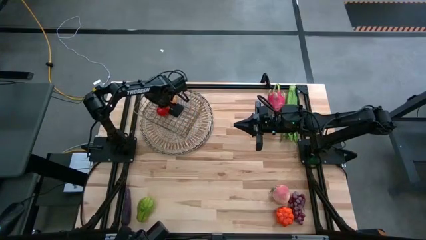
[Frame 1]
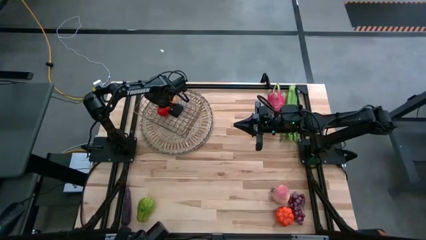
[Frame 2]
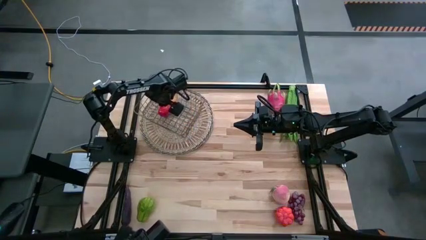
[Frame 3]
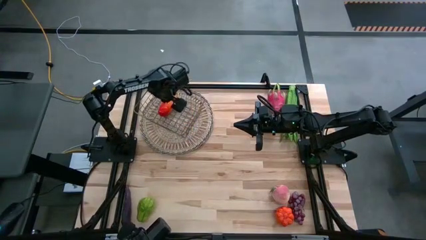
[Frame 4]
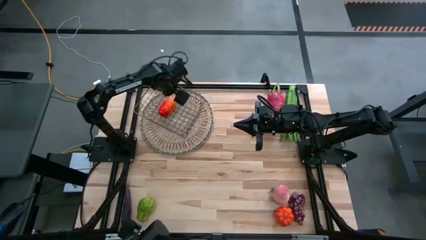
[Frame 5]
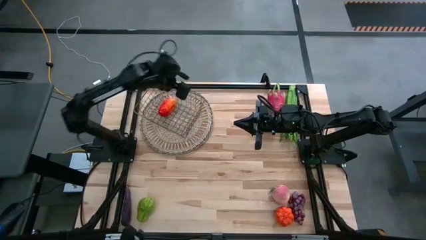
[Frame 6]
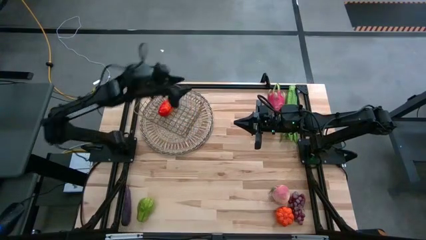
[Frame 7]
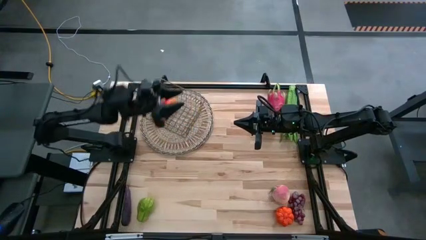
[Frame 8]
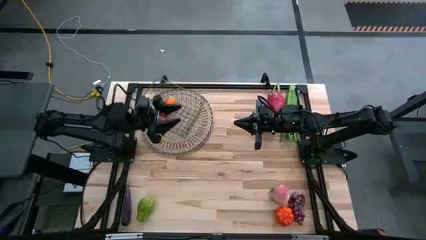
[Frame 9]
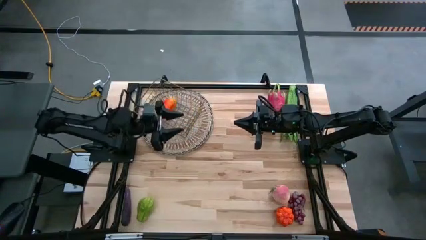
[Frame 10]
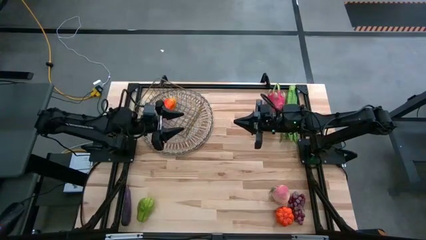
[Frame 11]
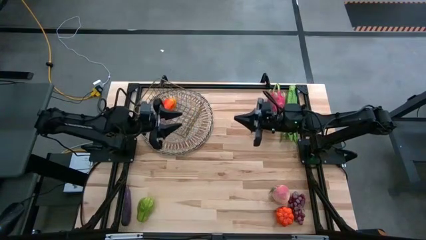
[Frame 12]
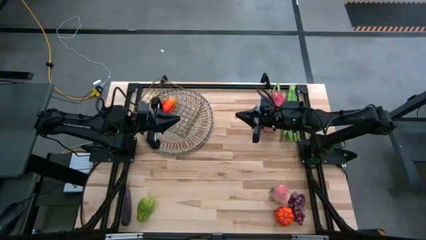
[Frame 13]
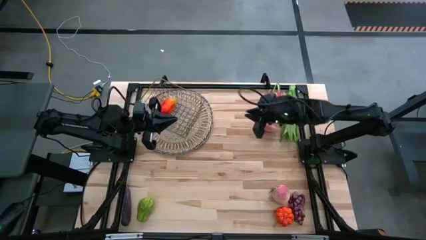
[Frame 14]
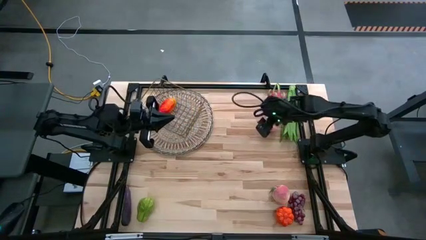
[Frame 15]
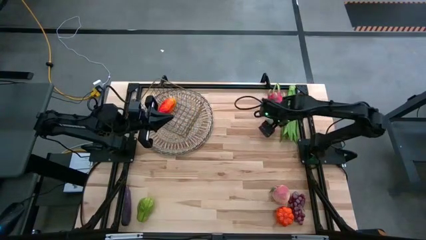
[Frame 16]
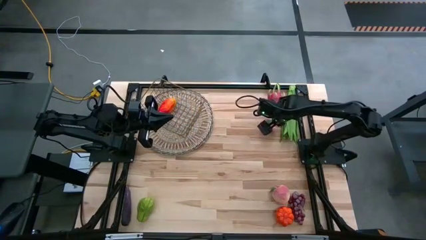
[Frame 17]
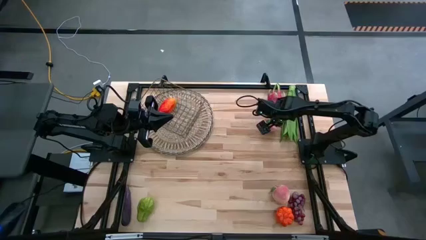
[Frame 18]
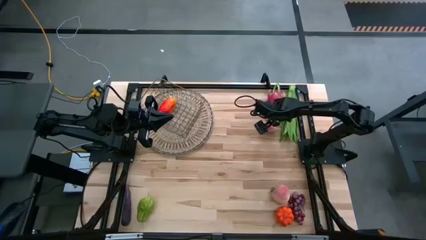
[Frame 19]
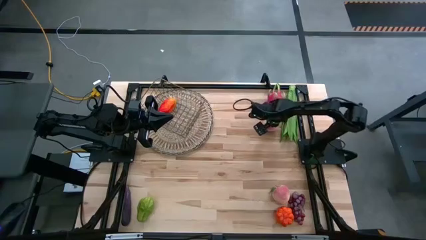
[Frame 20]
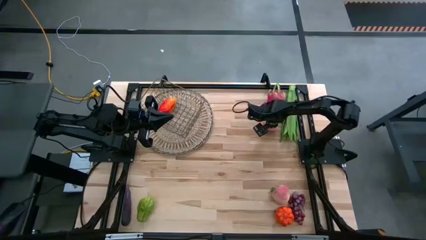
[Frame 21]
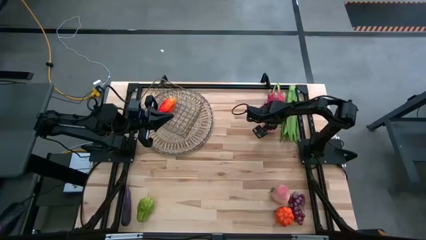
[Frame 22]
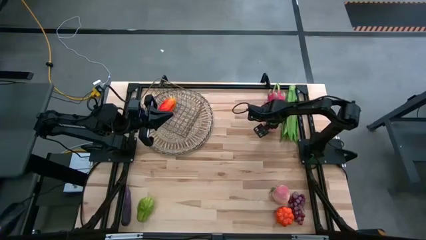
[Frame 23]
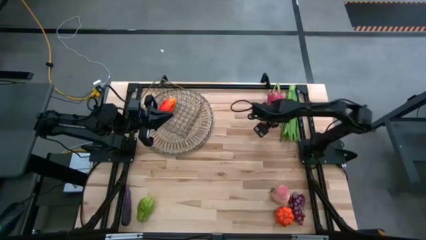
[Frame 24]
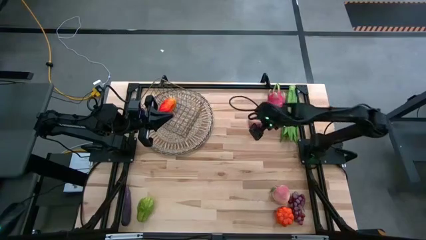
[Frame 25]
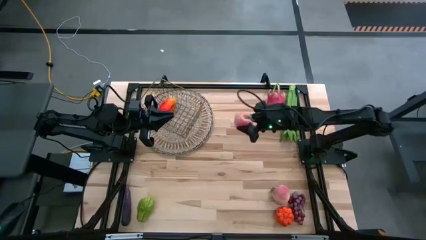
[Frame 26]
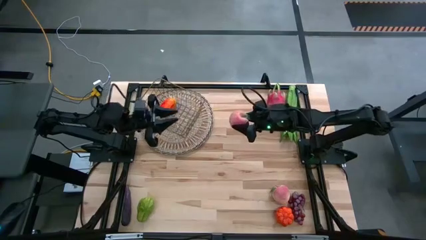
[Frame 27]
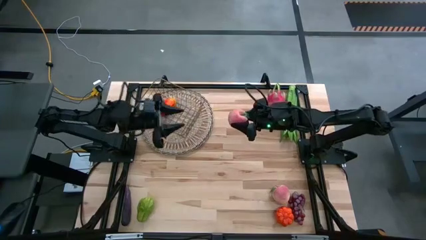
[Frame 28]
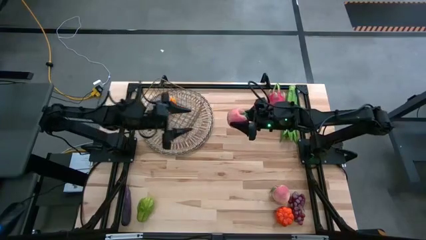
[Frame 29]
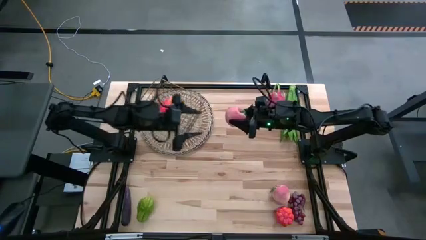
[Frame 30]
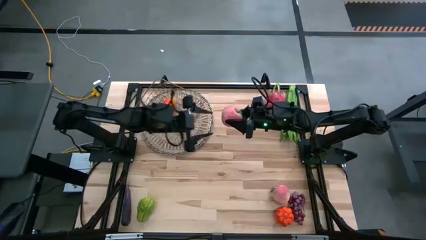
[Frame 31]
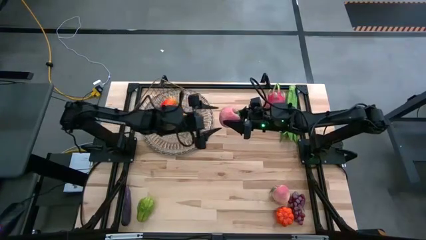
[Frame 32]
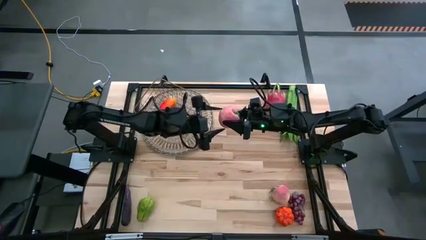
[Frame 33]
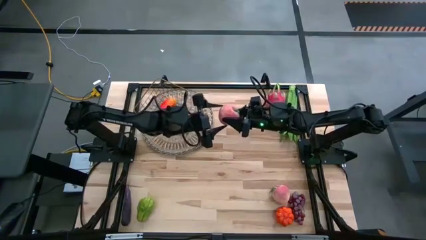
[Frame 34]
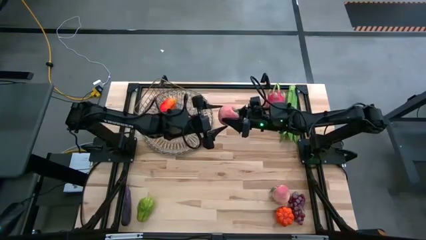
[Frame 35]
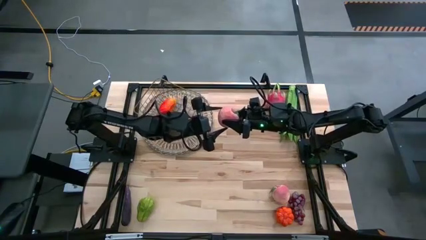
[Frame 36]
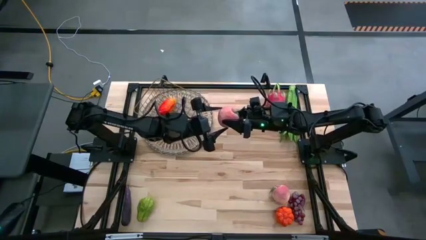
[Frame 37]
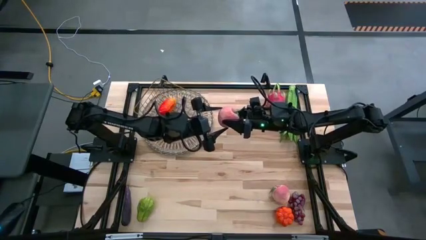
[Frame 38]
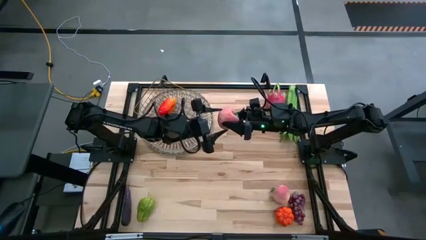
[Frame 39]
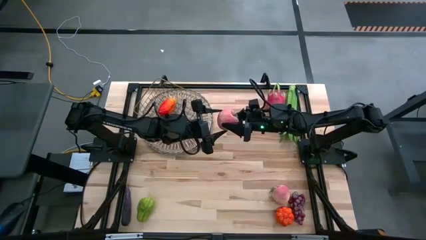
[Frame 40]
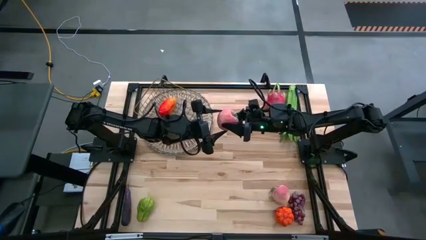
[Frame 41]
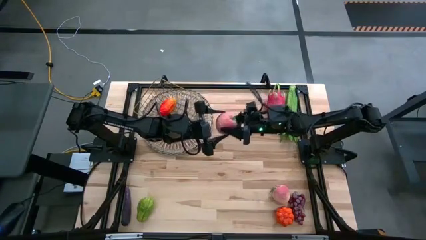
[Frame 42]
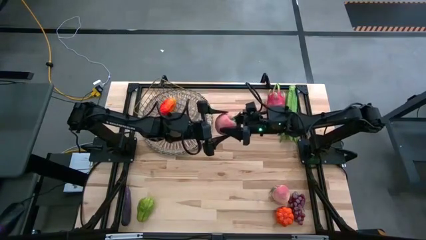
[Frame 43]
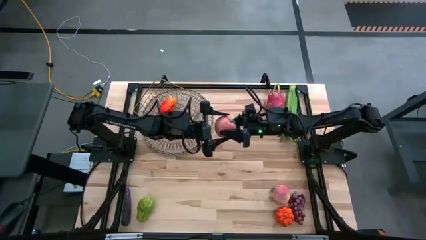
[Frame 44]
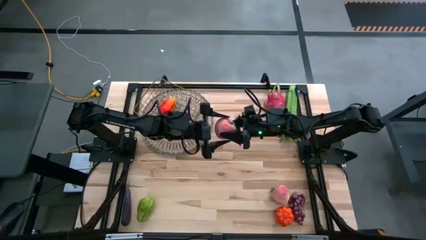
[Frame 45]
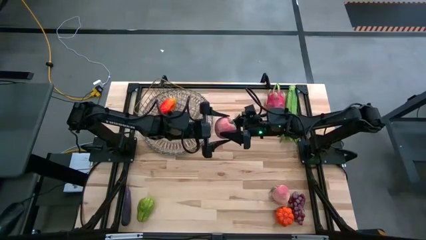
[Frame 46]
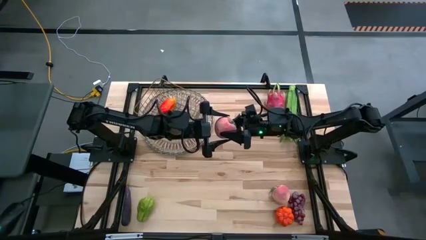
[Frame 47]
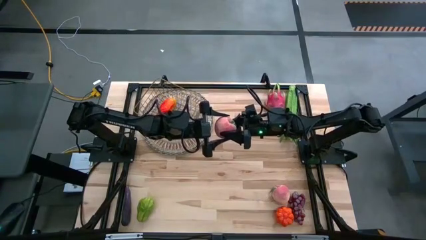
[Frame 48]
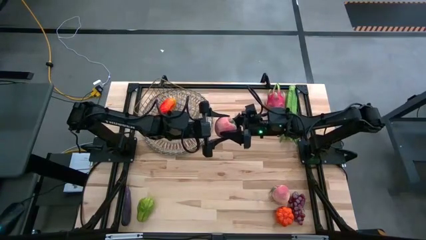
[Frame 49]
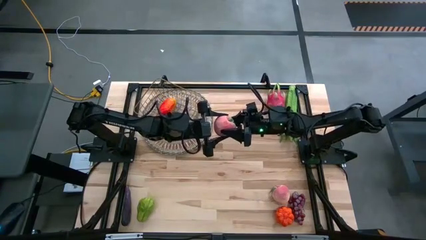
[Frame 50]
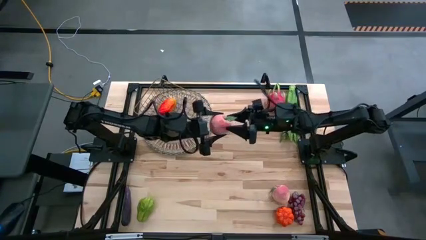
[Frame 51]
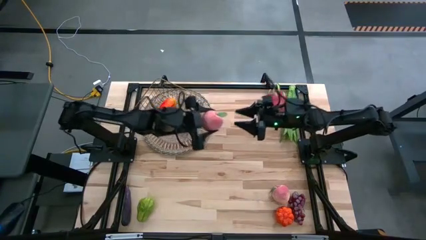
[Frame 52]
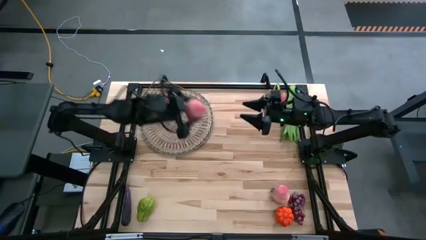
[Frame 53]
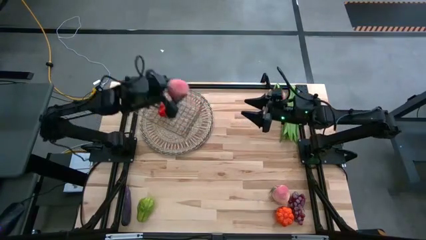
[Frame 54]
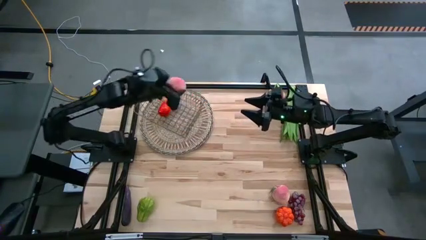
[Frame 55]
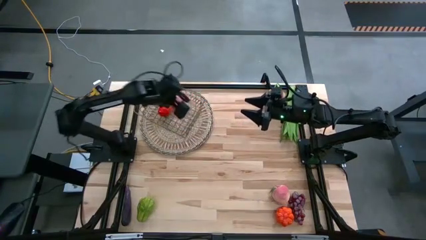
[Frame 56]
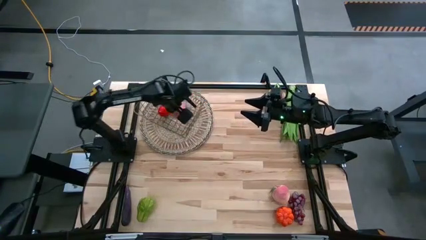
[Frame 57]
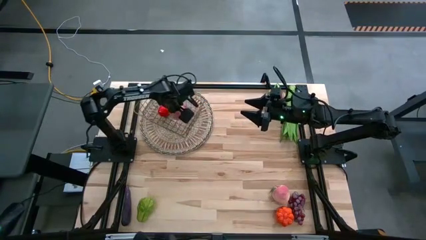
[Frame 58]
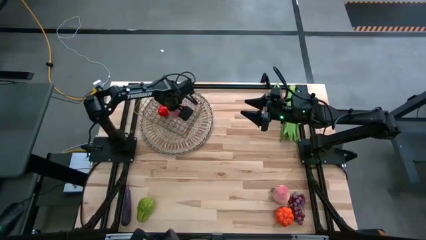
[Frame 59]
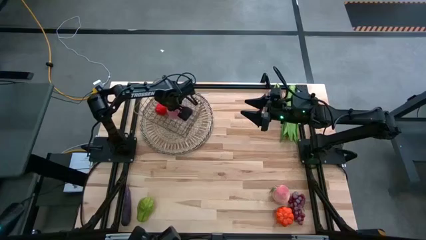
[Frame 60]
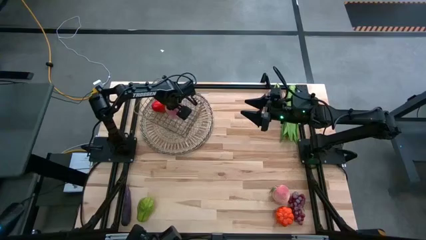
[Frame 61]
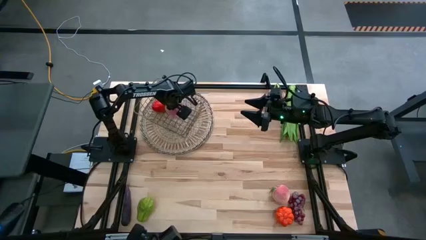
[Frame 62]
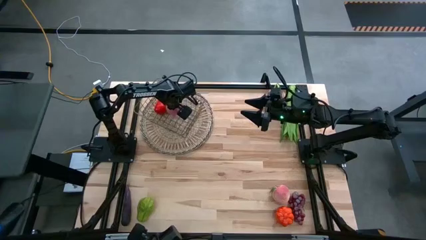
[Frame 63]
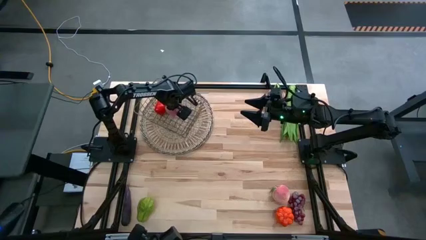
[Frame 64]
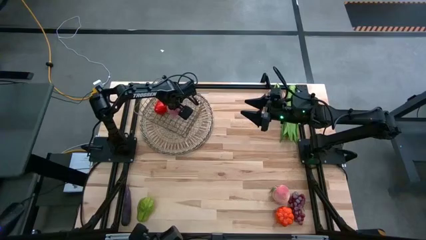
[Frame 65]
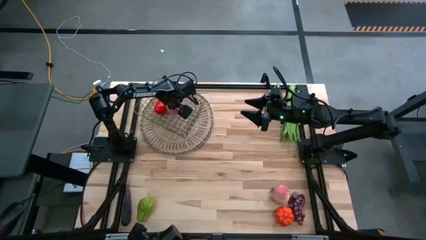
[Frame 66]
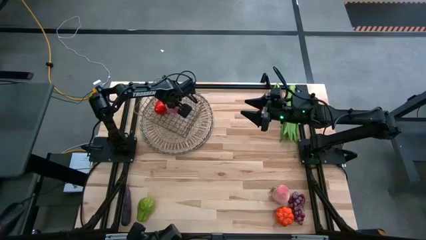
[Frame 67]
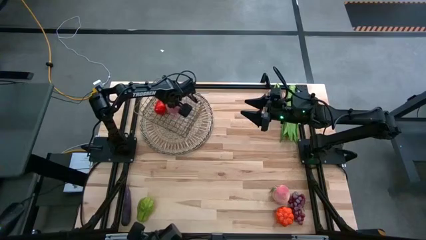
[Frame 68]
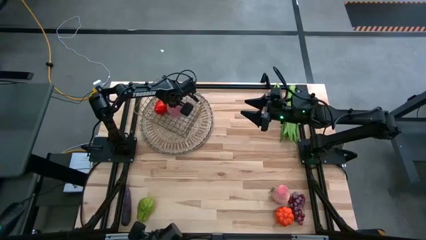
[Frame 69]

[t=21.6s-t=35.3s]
Task: Build produce basket
Put the top peach into the wire basket

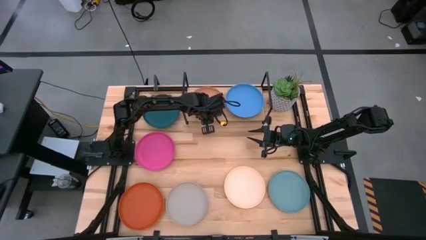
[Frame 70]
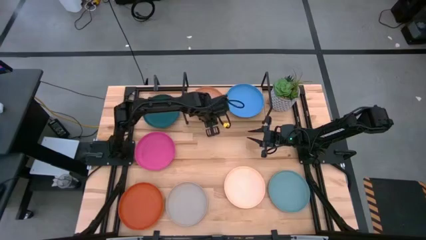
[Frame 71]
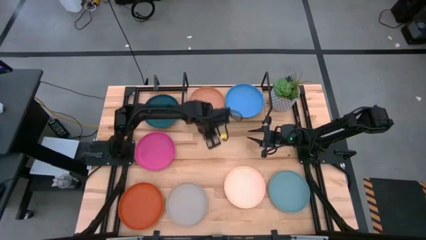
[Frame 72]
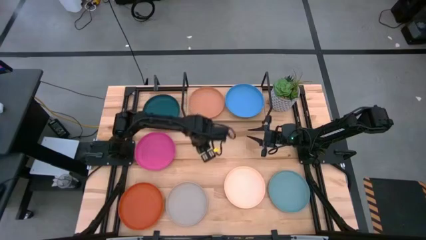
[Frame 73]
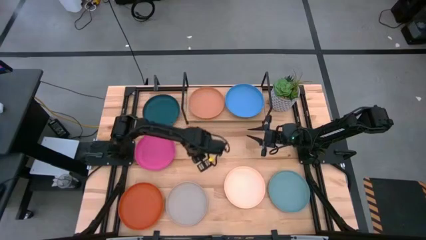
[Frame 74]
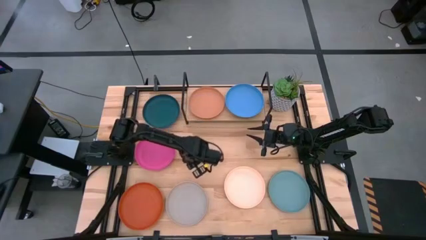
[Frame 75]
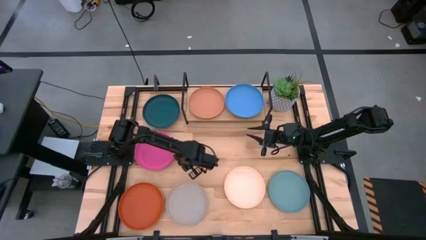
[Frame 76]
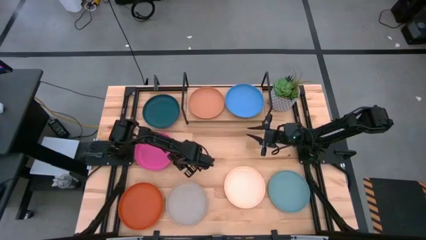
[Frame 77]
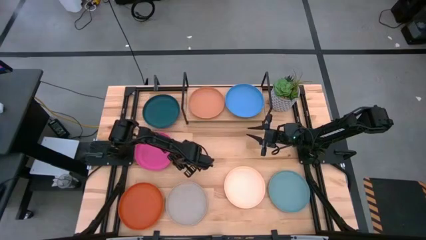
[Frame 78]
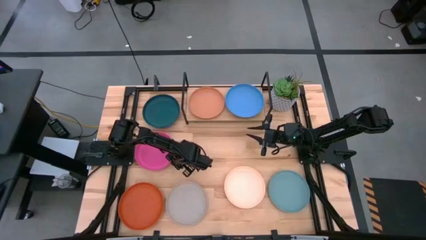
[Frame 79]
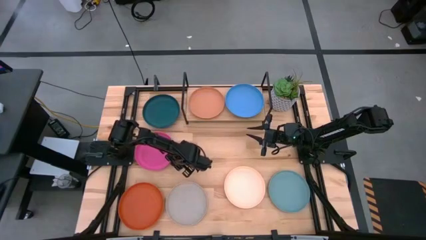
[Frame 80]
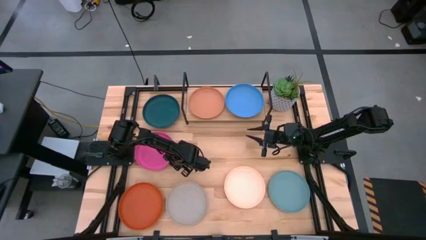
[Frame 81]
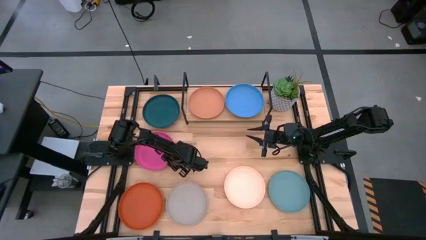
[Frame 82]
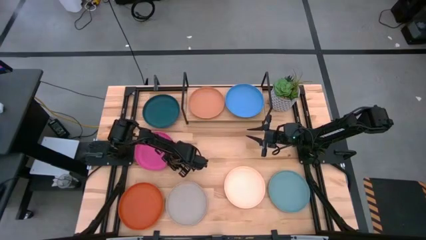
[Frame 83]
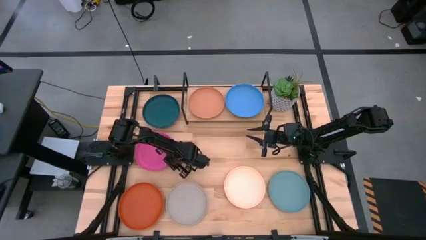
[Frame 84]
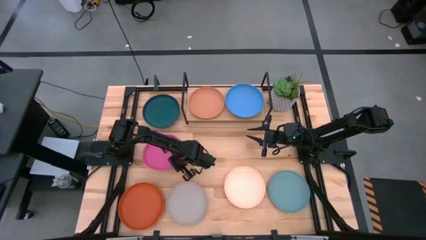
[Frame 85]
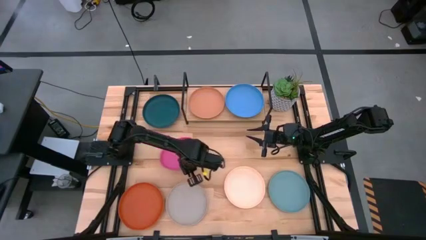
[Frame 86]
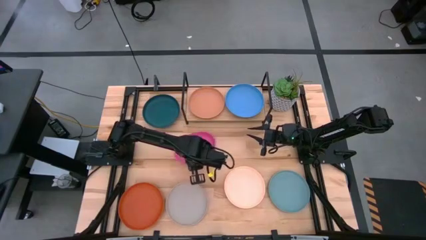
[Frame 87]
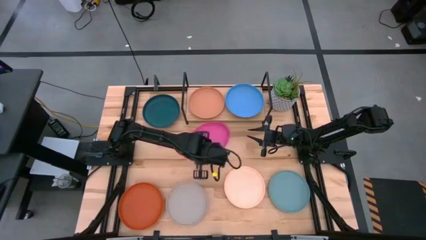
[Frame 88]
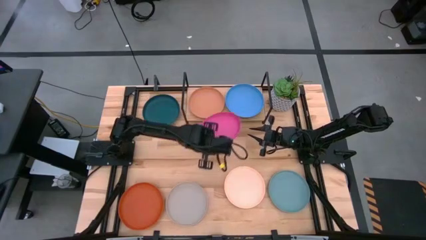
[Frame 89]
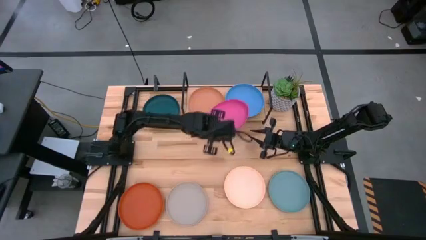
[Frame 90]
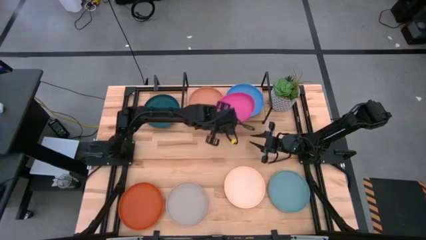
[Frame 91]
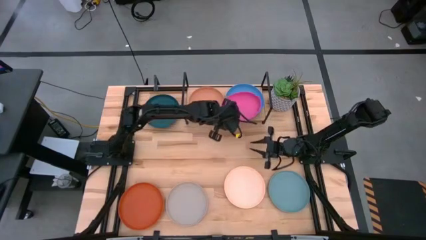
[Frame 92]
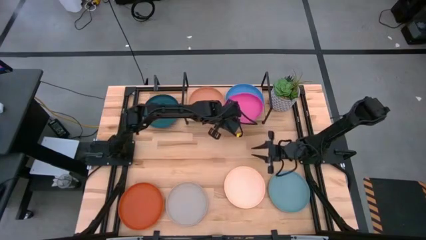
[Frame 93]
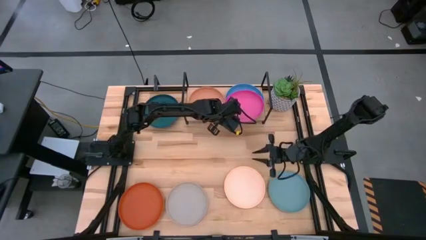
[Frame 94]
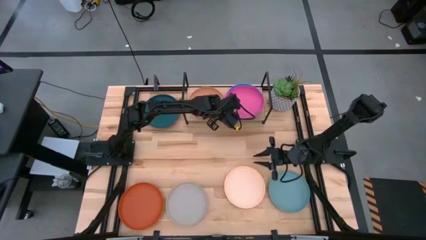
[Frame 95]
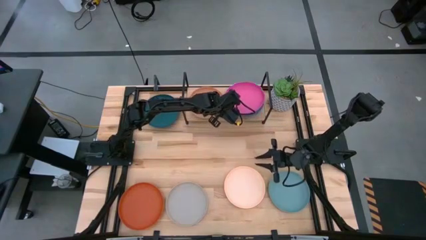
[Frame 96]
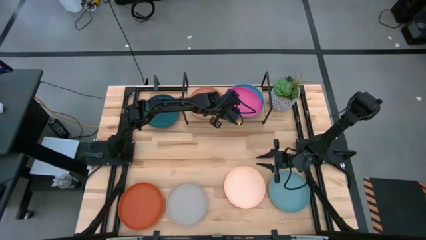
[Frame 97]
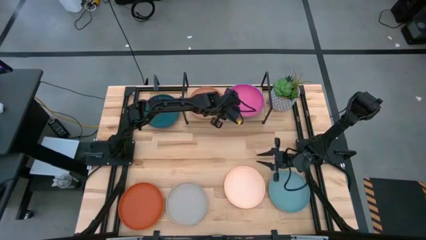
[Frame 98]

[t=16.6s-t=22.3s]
Task: Place and stack plates onto a shelf
Stack the pink plate on top of the blue plate on the shelf
